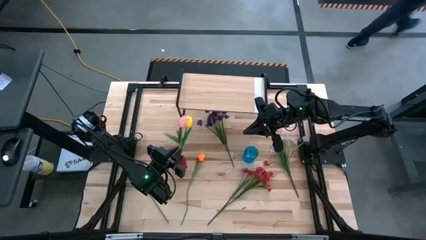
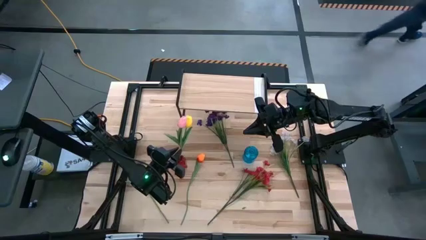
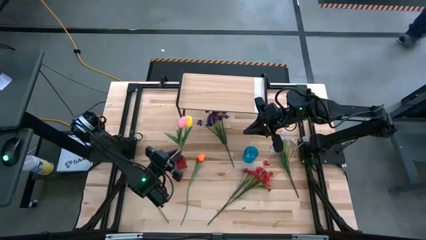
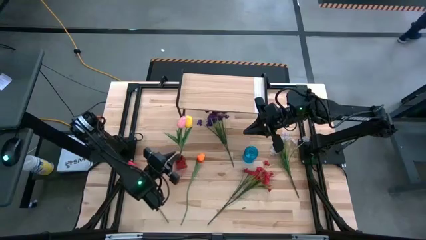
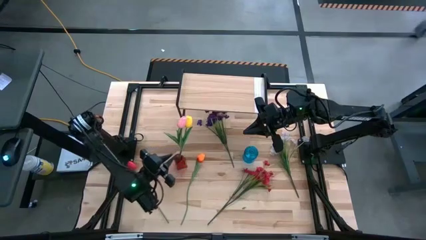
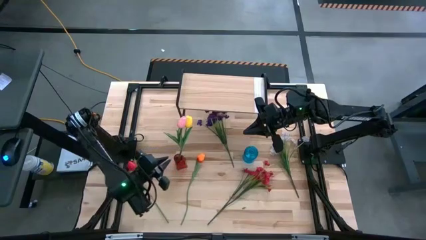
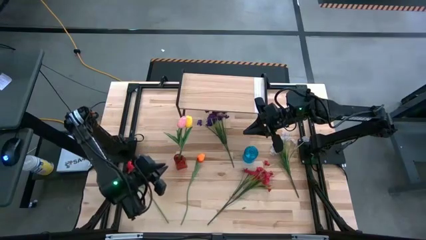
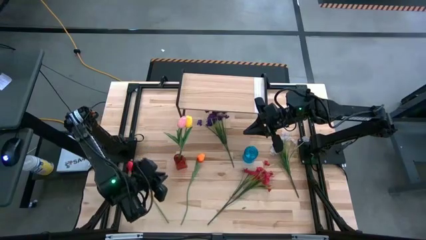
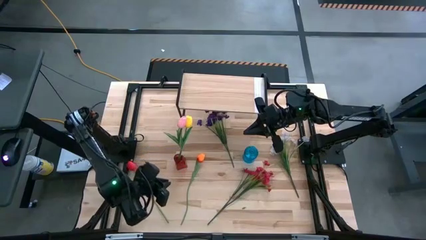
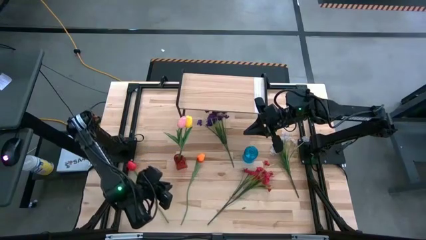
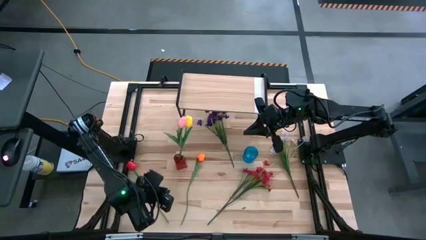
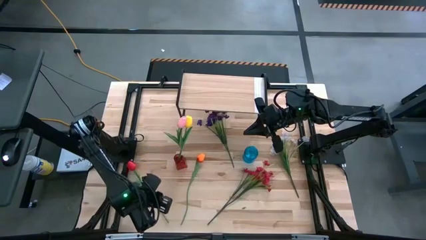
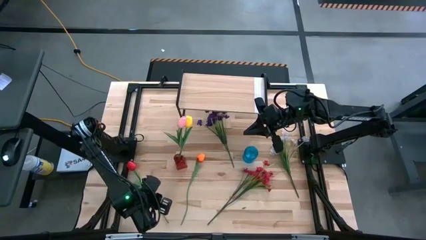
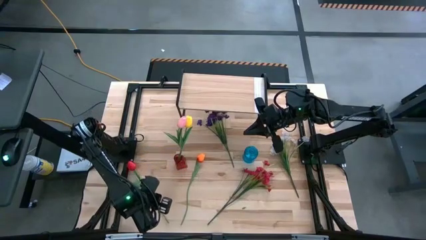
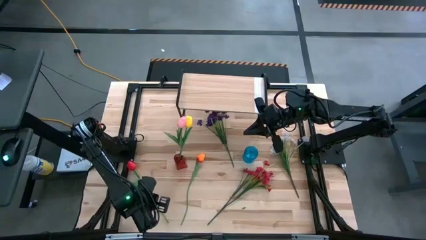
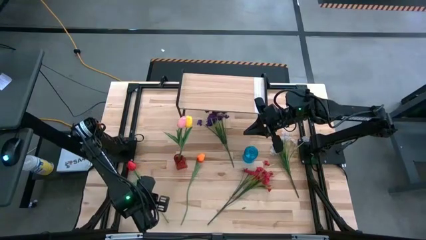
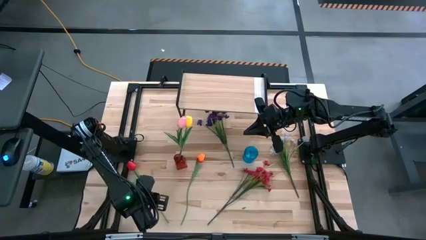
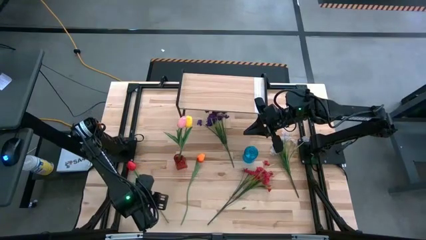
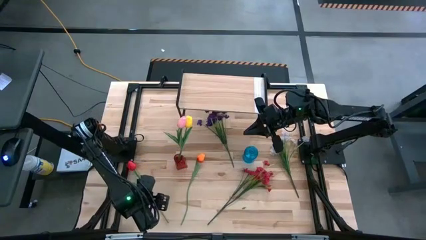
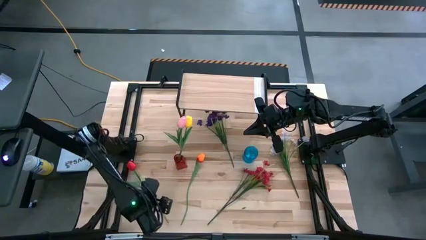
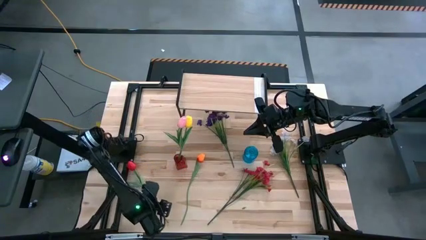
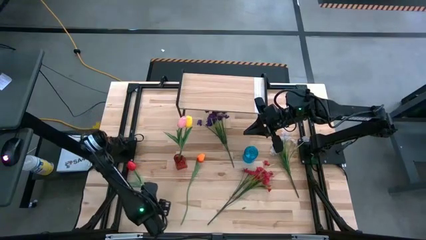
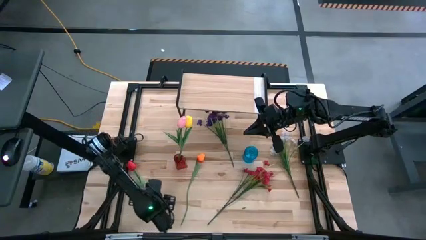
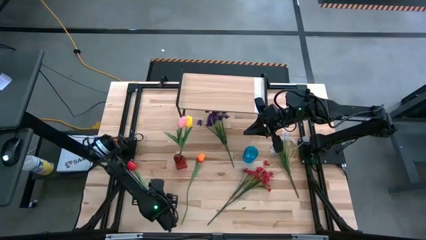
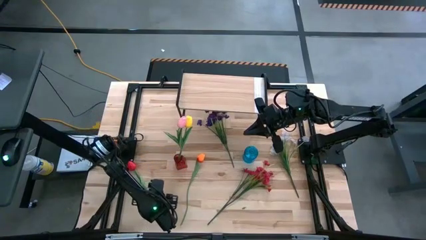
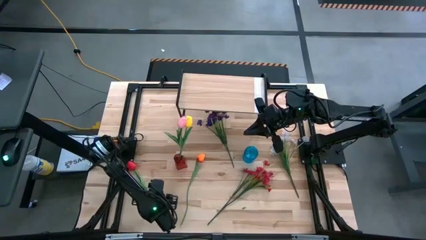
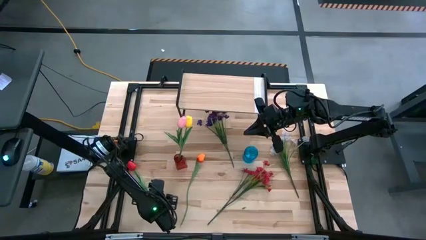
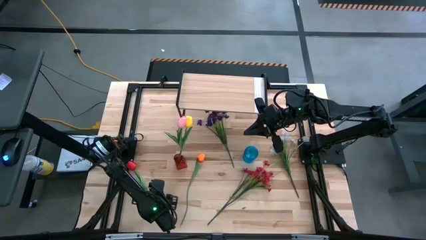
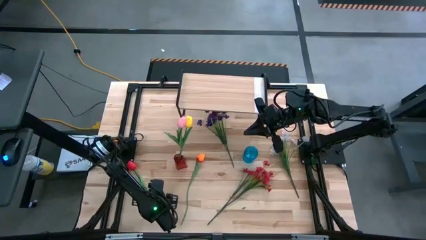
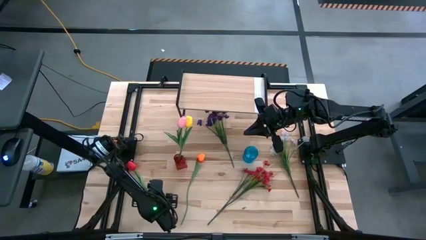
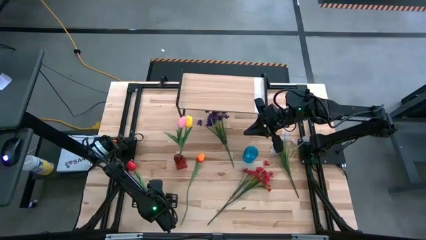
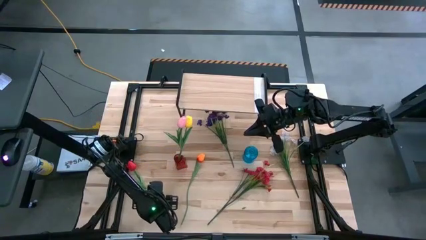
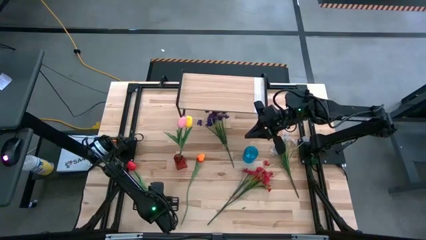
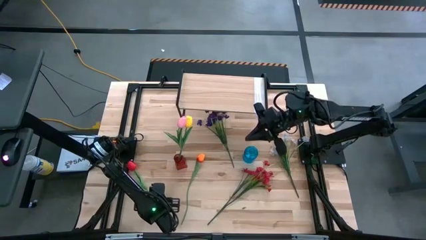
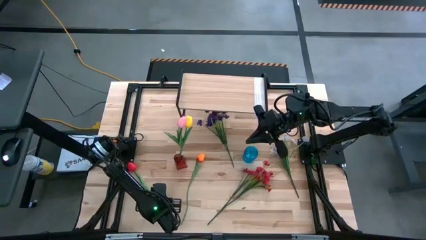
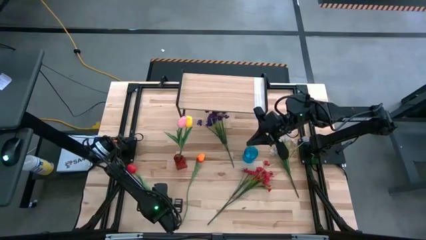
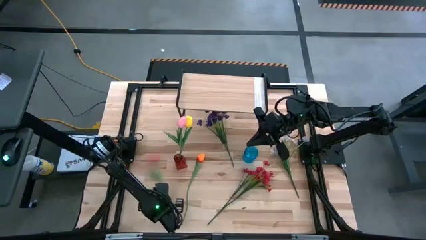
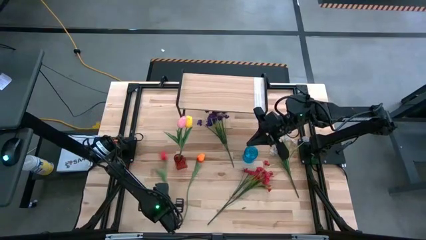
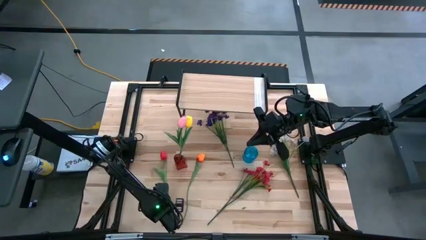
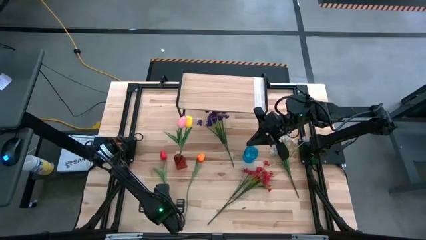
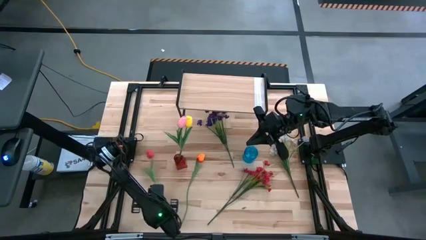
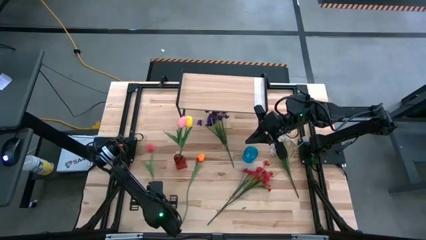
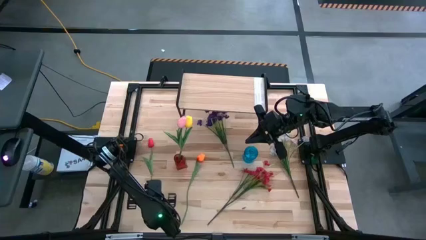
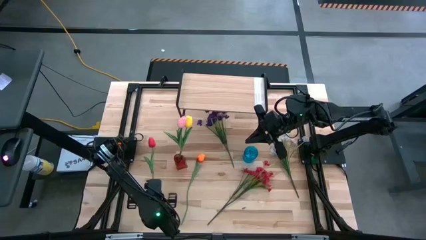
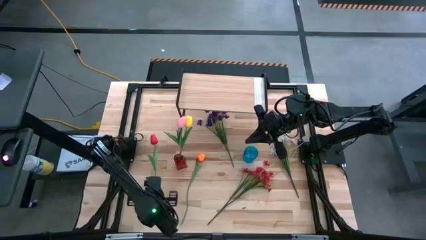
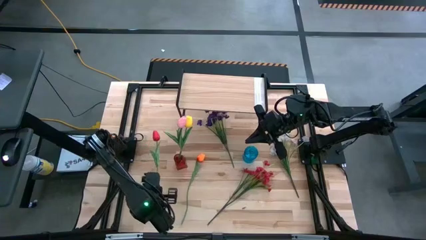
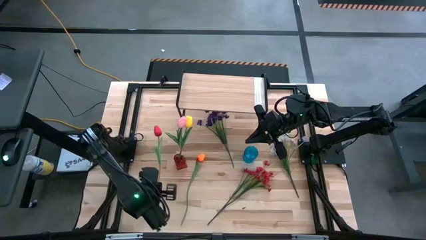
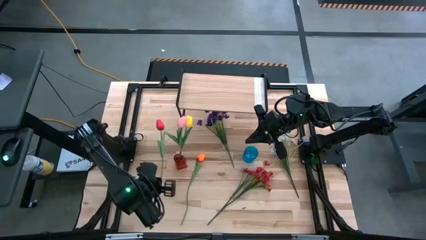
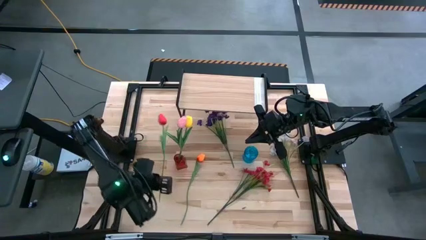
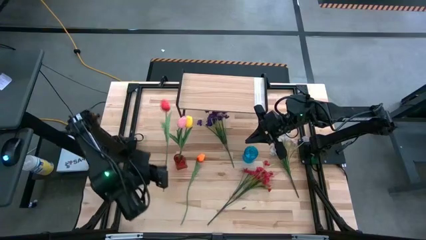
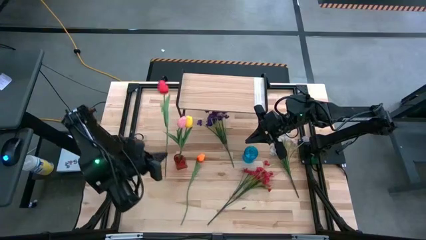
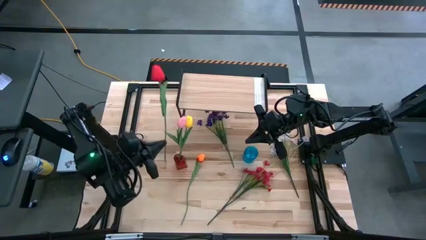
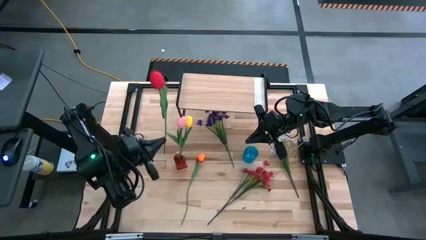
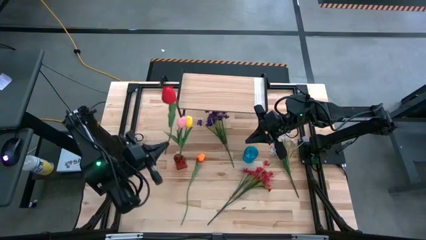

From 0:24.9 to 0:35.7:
Task: Pick and place flowers into a vace then onto a shelf
Put the red flower into the red vase

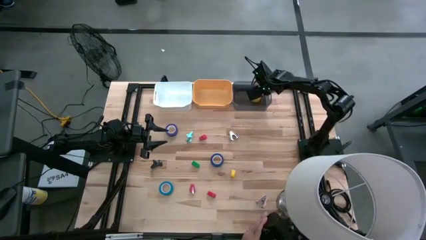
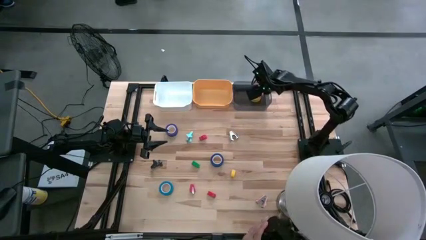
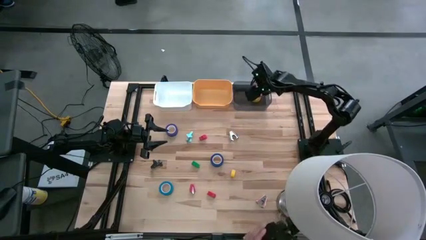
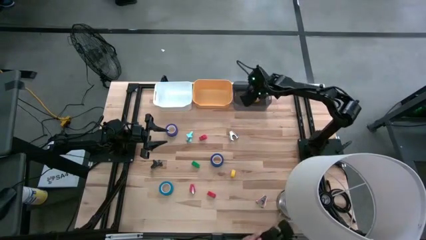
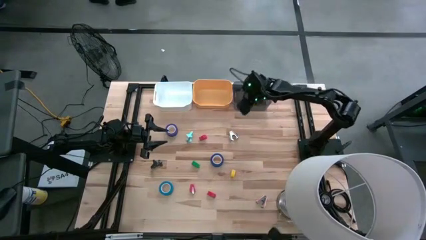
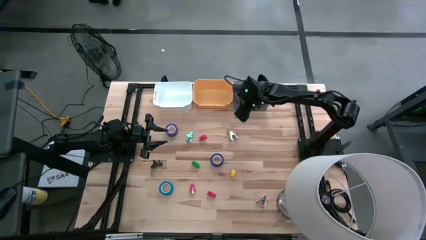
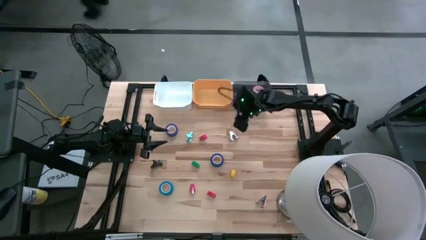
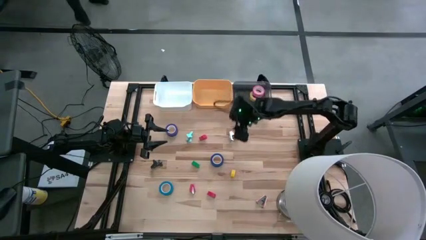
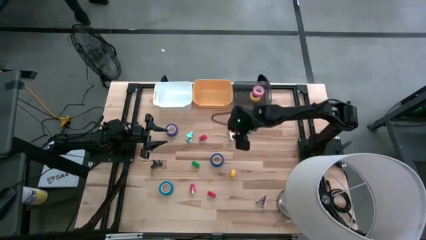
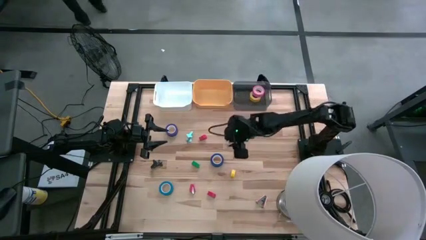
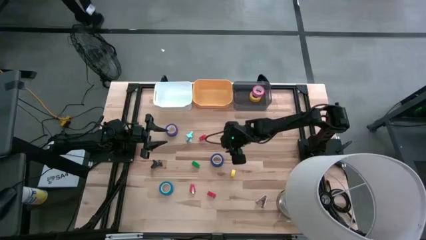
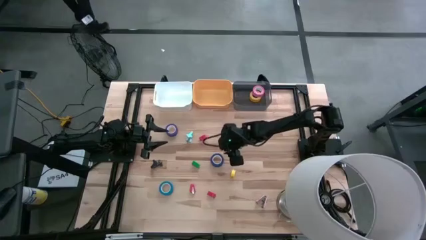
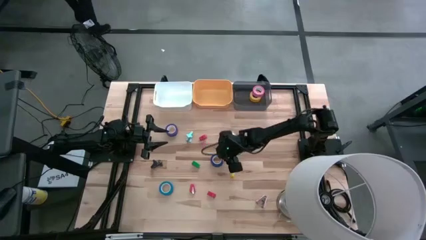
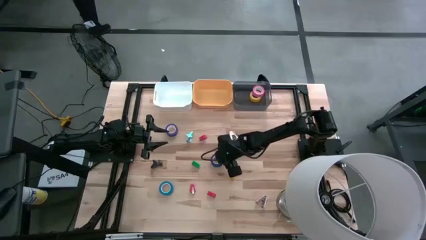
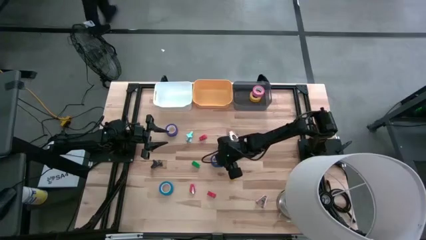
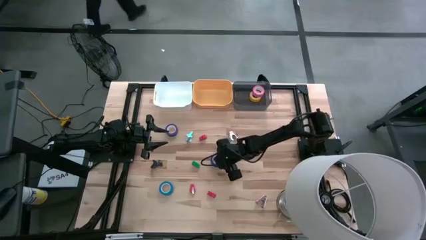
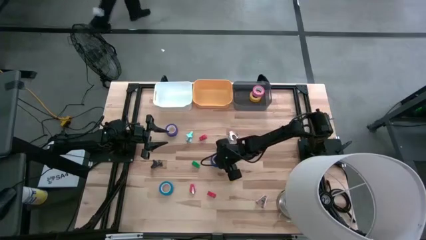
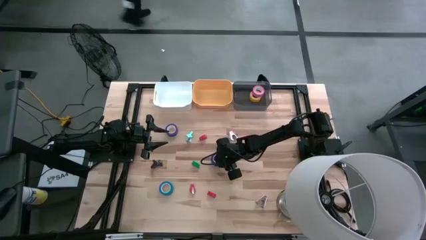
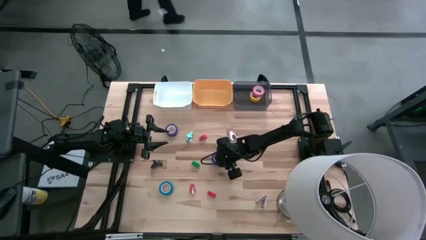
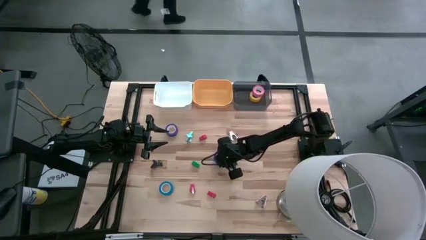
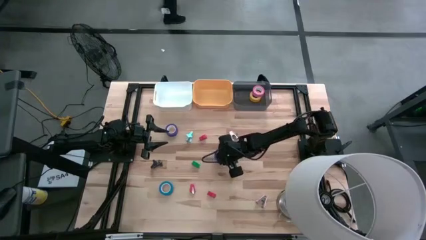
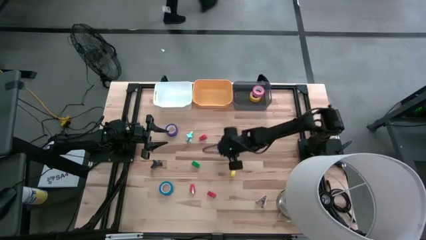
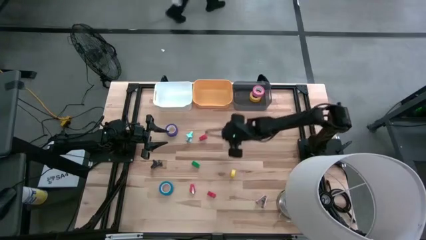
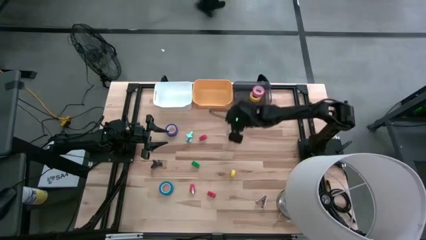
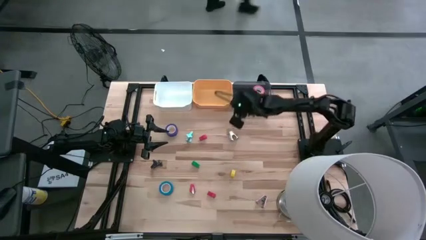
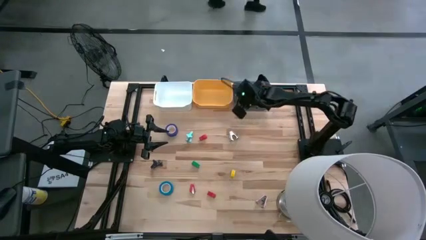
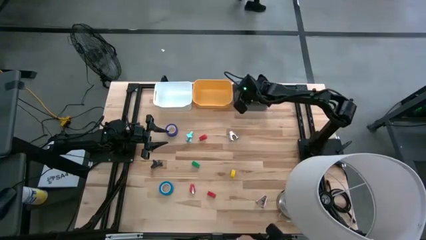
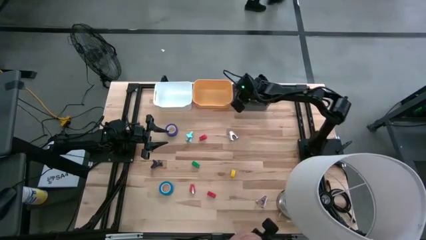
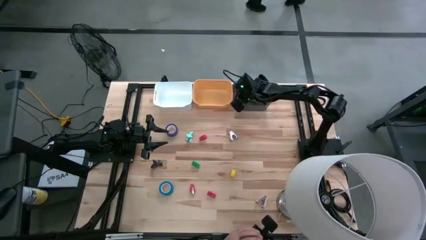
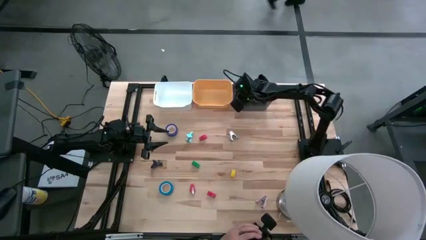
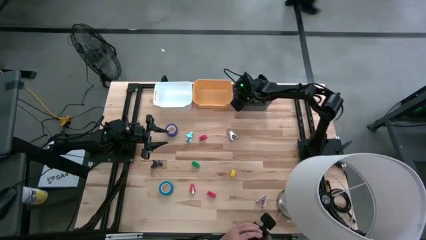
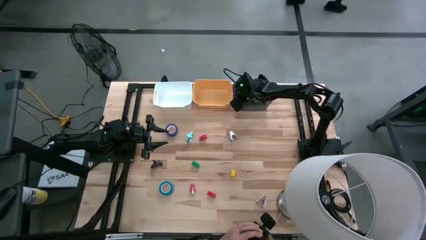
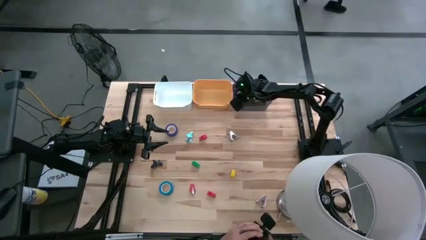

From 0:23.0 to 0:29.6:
Task: Pick and place Stapler, Stapler remover, tape
Put the blue tape into the gray bin

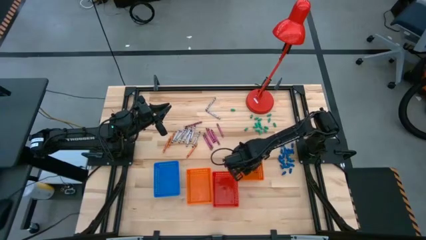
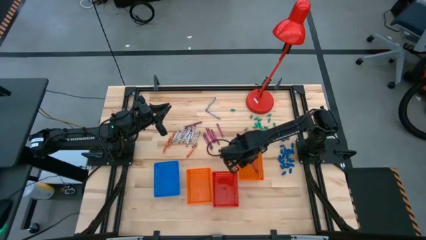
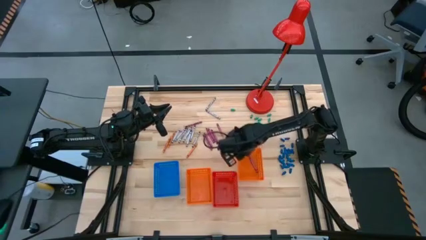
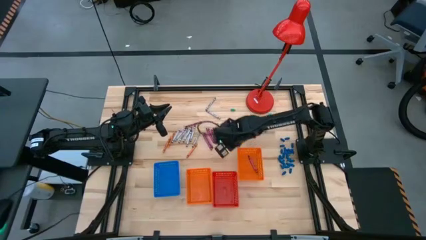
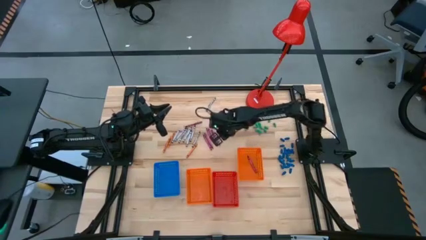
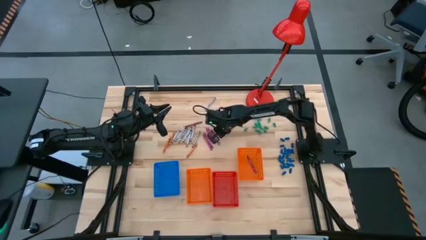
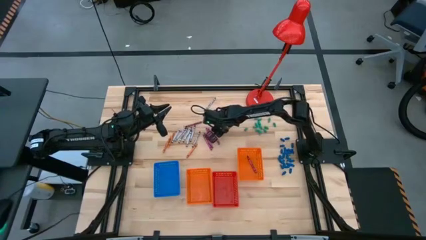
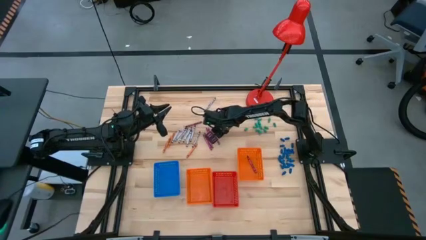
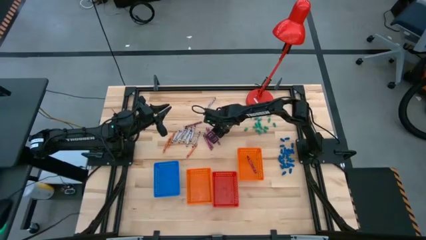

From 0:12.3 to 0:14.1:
Task: Sort crayons
Put the red crayon into the right orange bin
